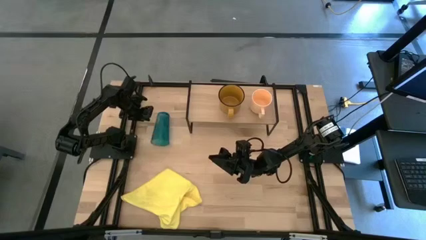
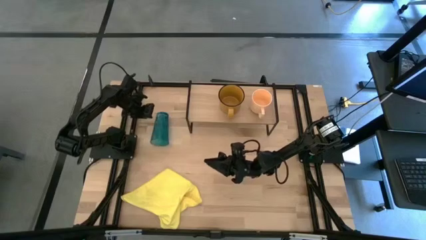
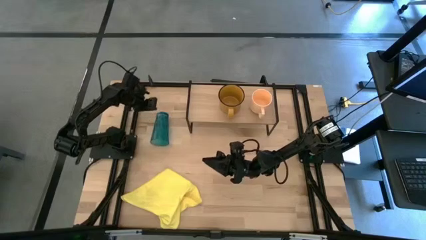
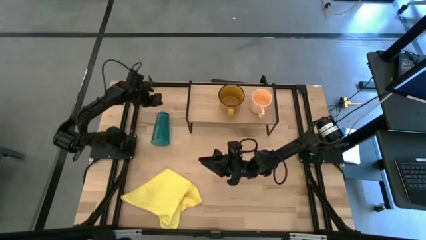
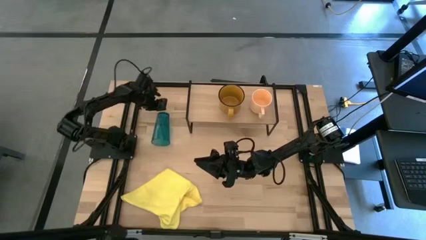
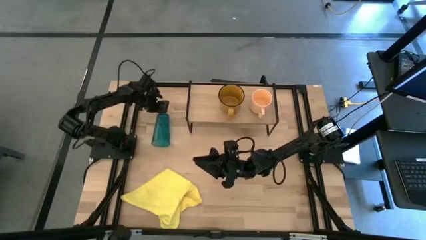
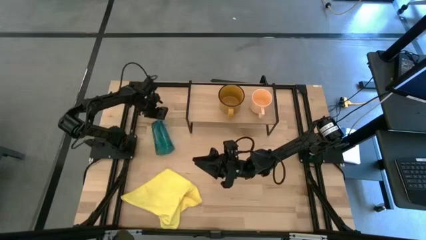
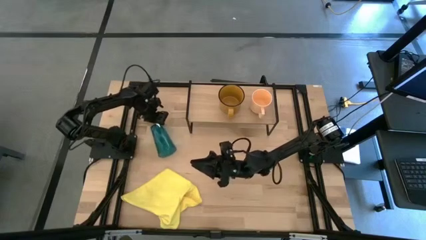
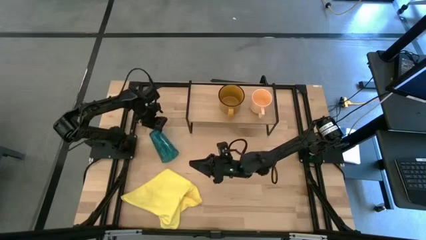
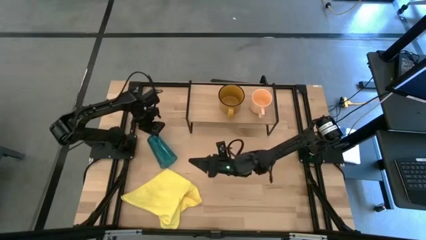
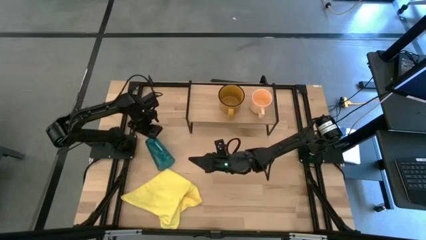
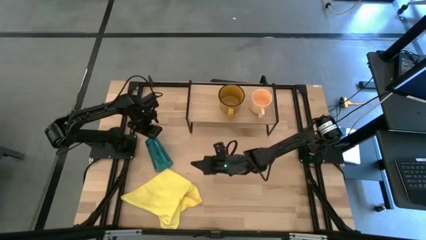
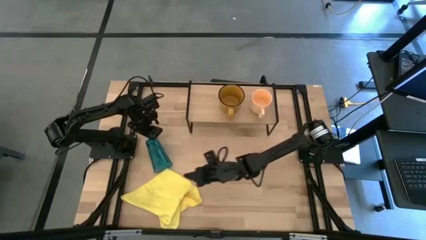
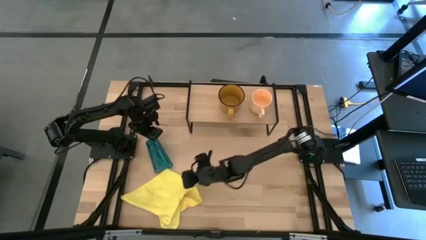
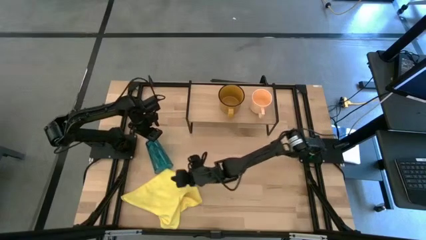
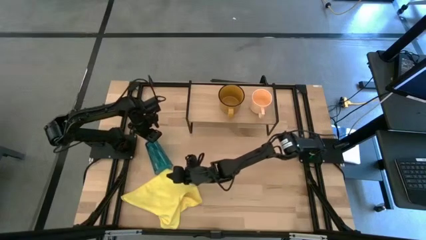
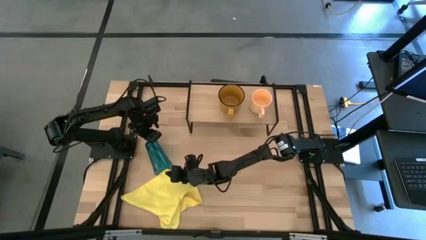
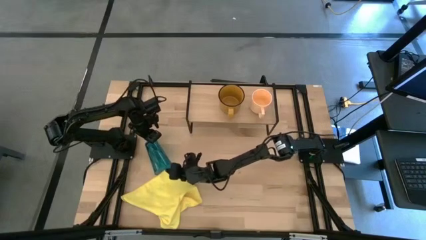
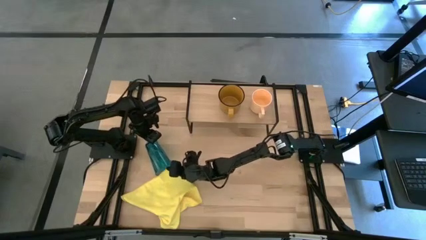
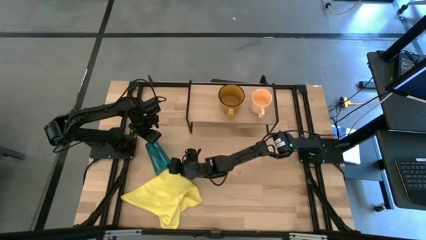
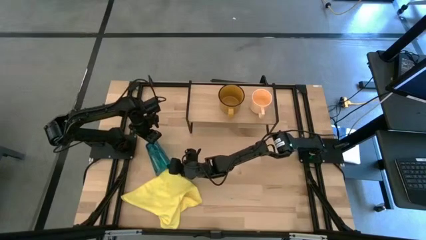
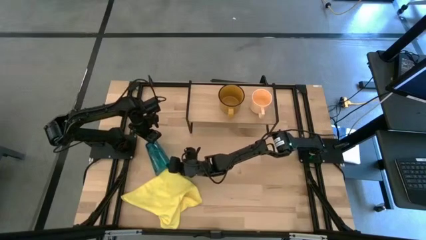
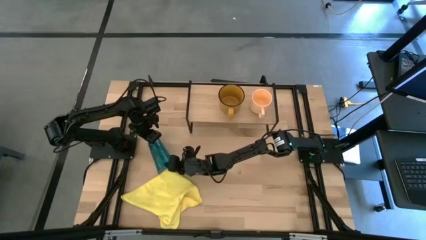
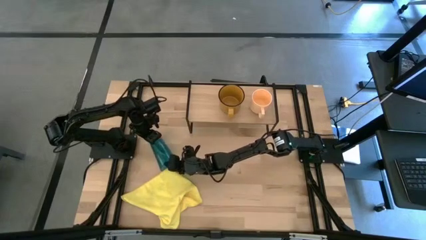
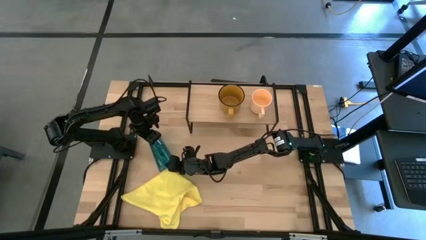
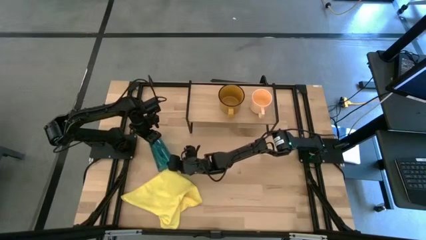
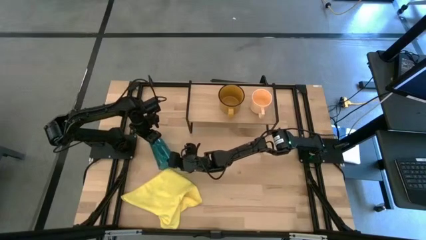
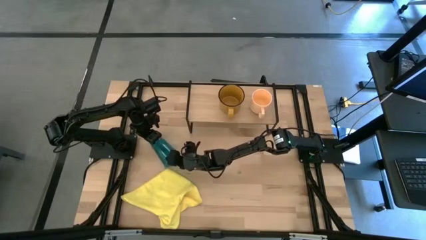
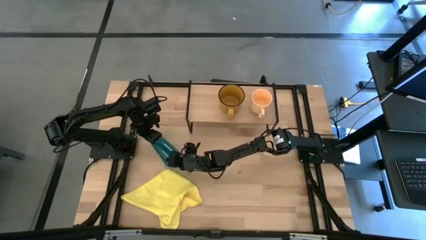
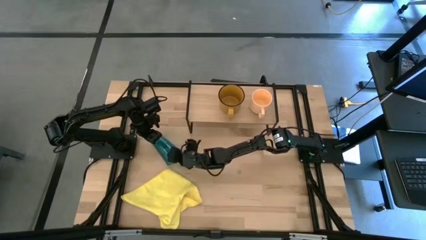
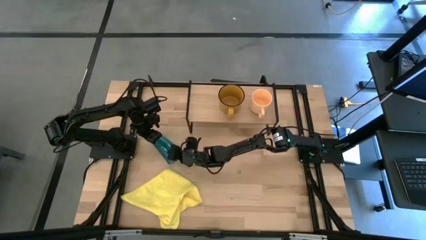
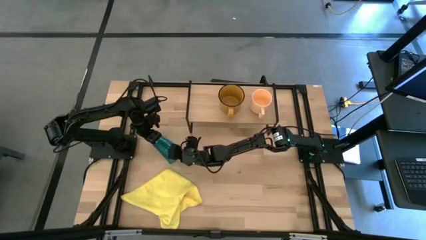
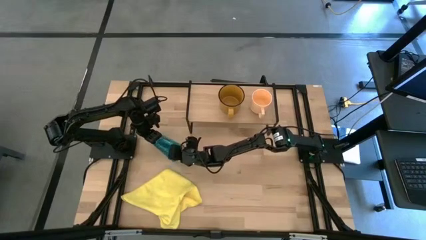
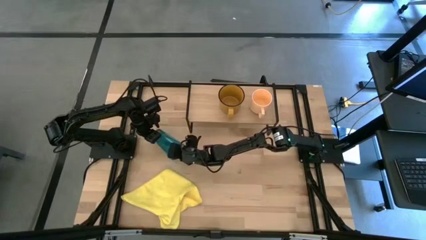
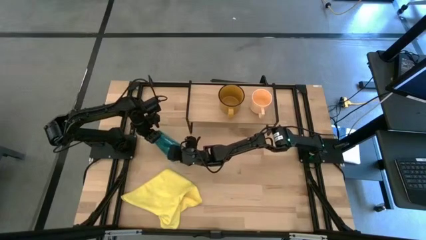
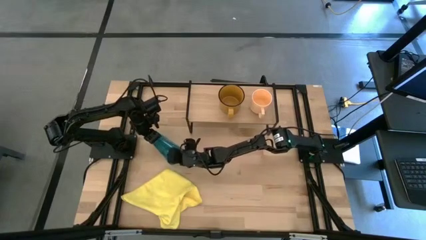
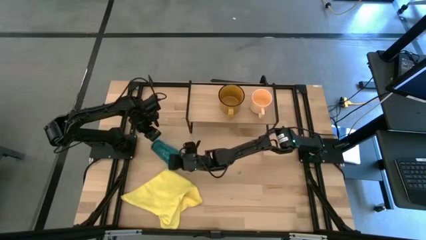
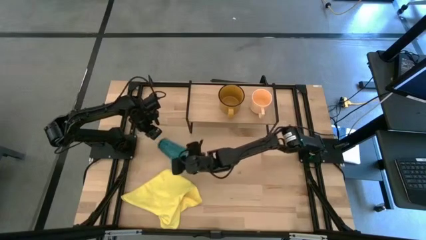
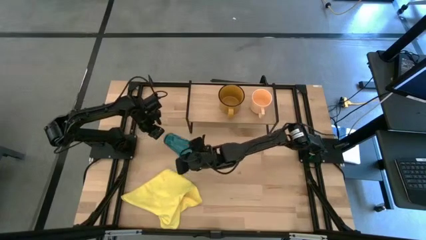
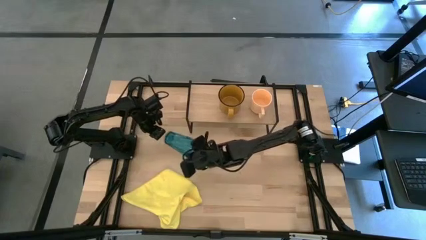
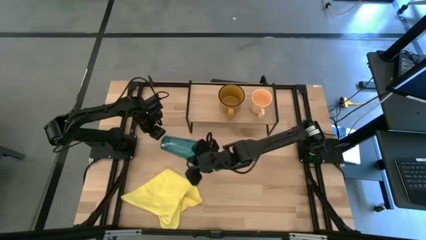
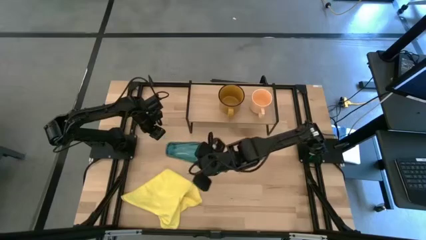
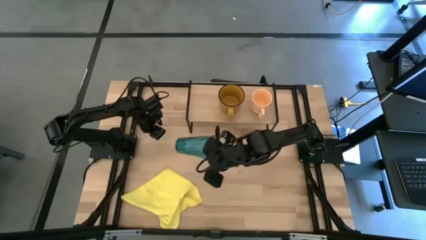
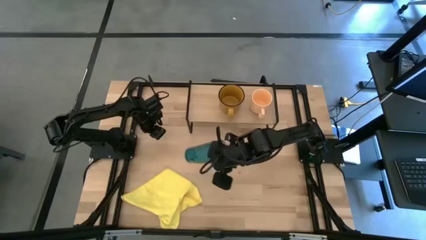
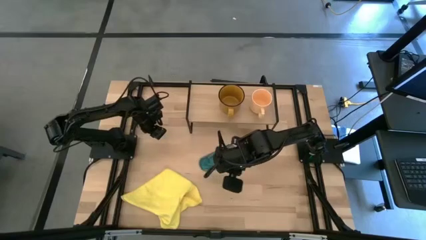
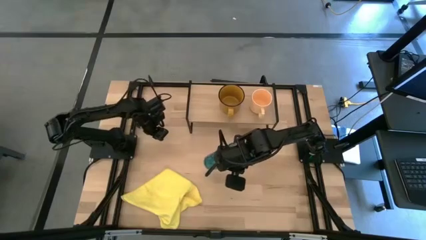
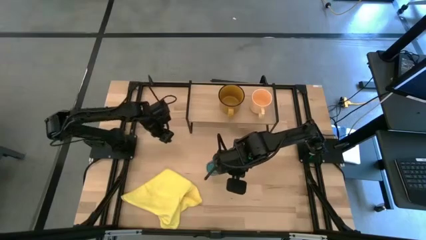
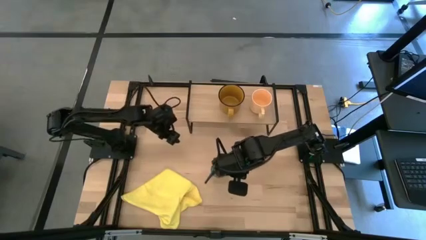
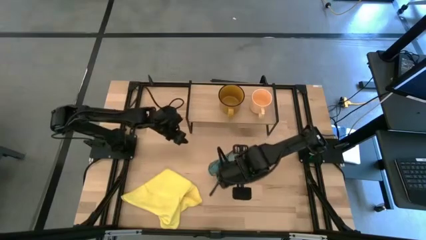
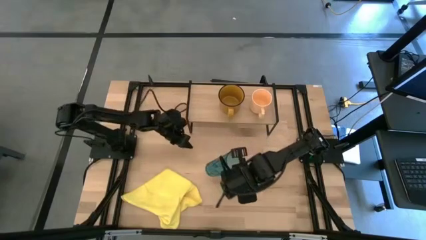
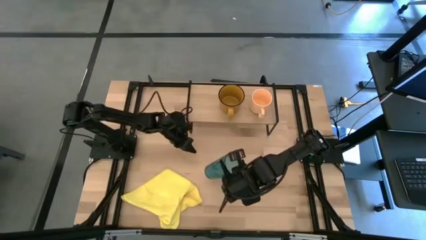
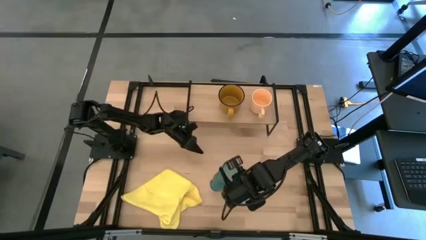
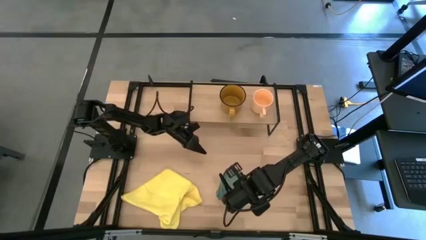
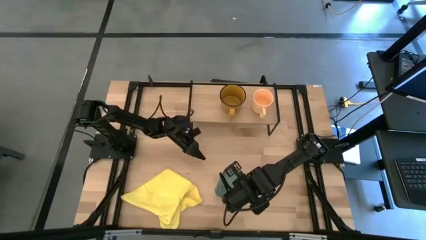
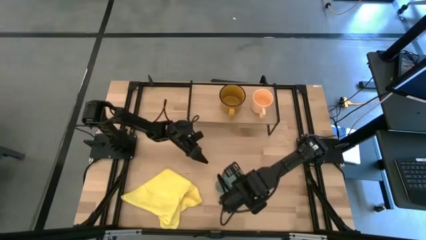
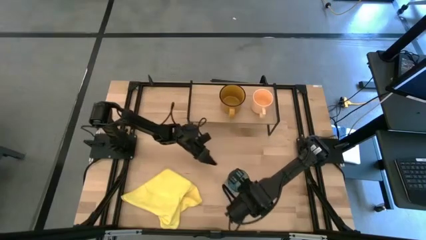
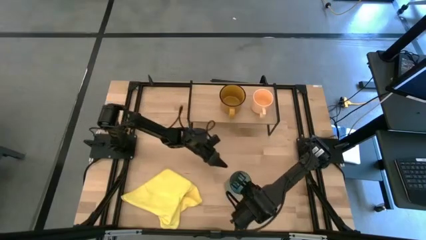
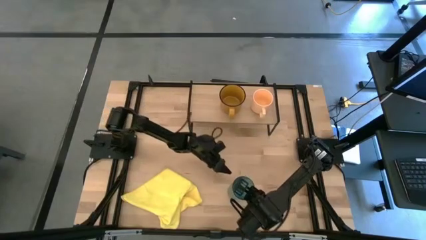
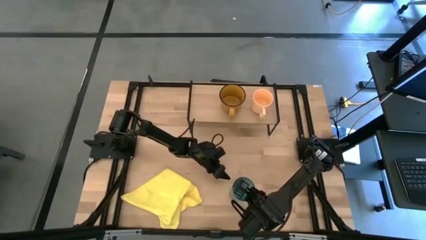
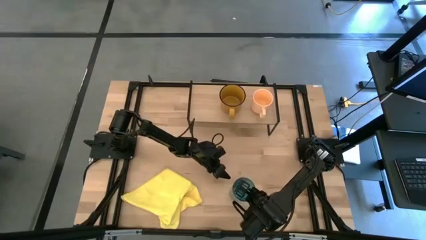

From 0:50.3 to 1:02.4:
Task: Stack small to large cups/mugs on shelf
Put the blue glass on the shelf

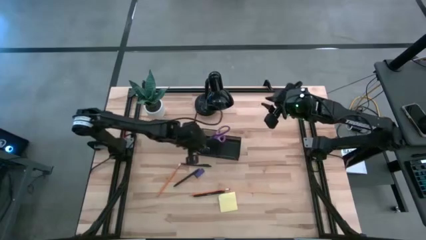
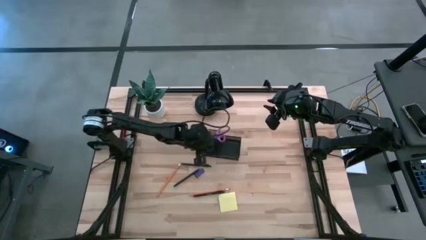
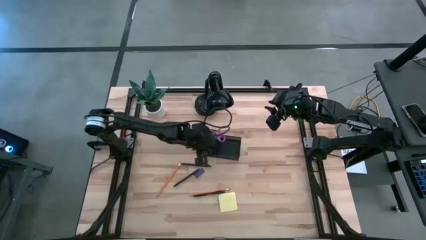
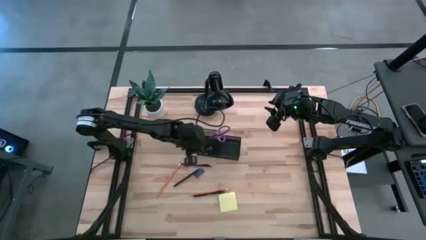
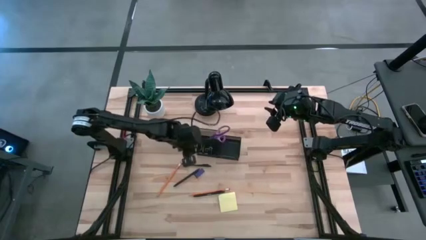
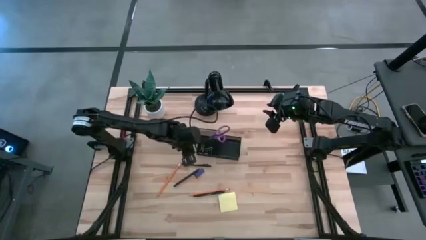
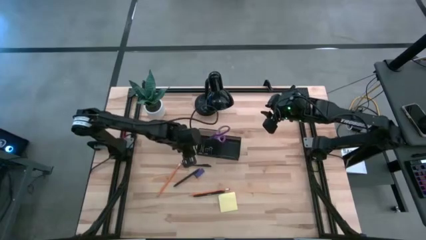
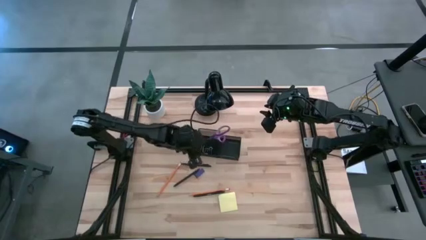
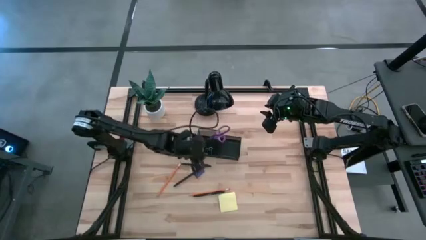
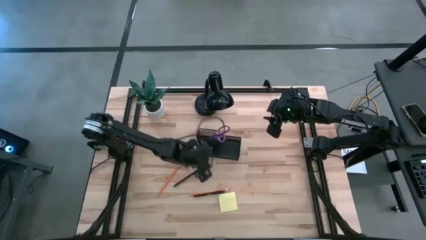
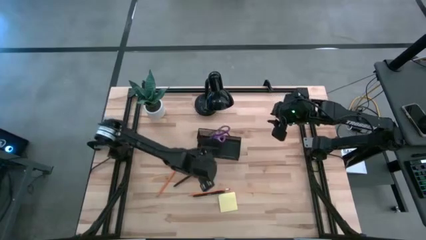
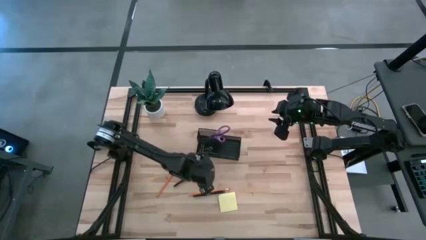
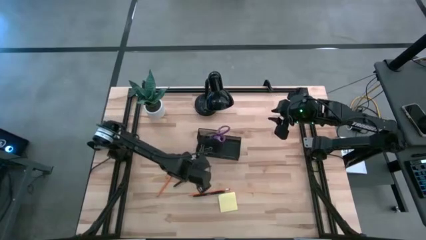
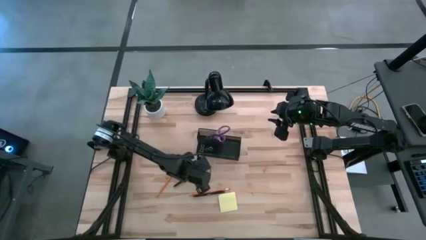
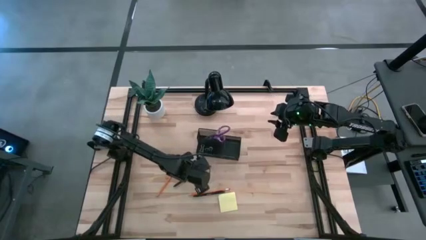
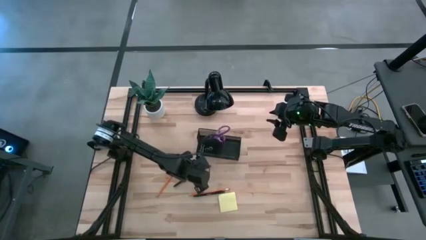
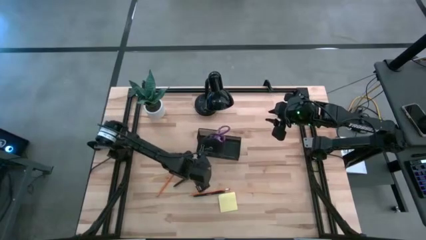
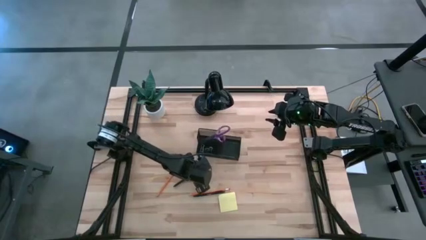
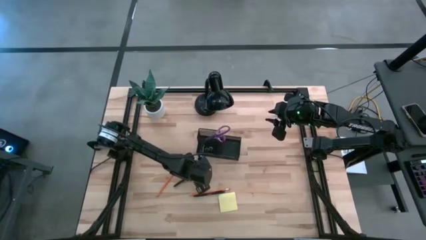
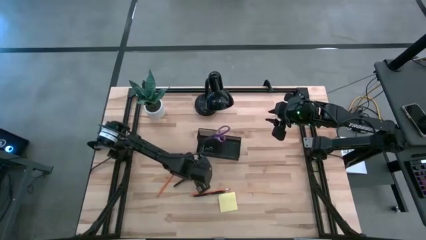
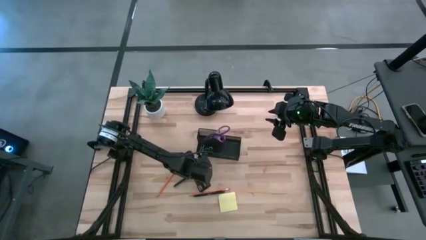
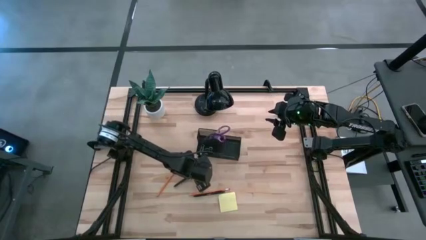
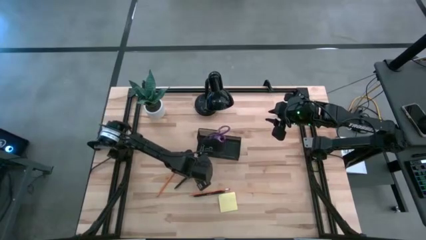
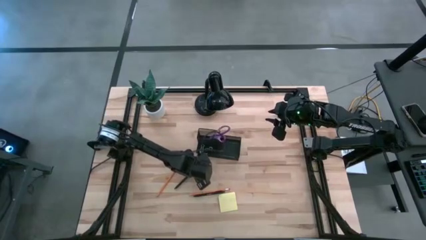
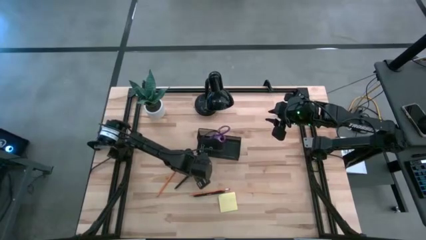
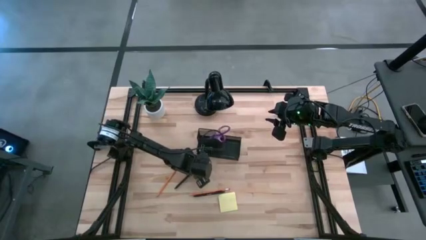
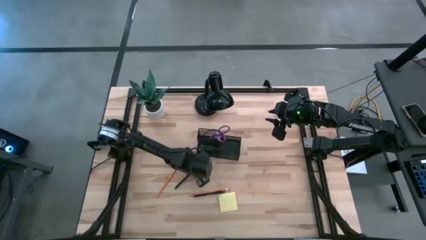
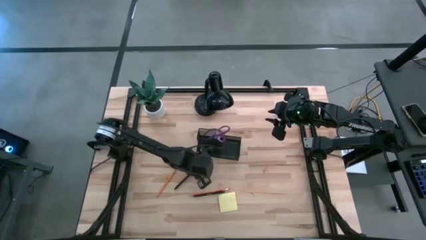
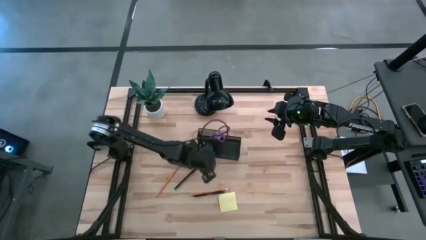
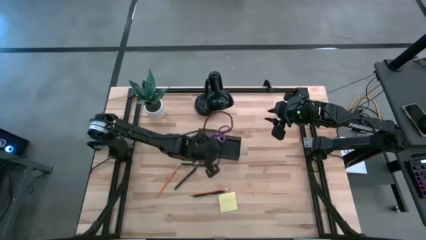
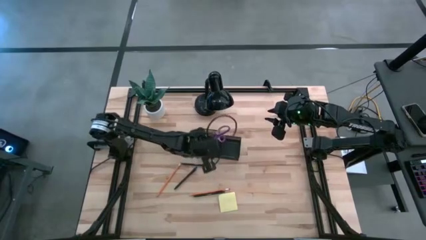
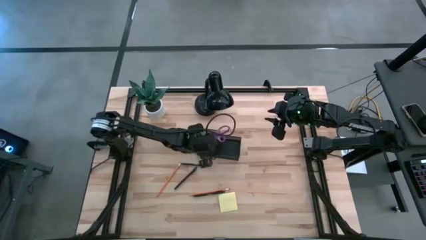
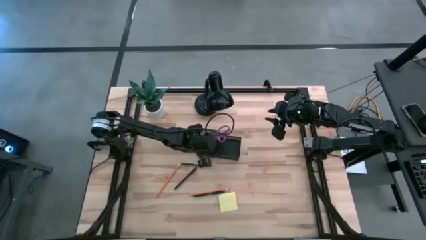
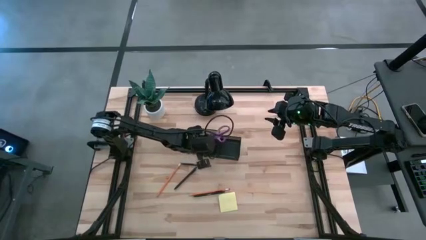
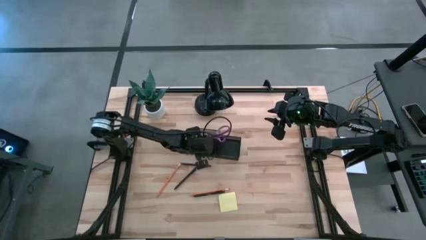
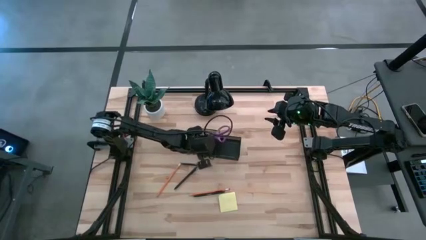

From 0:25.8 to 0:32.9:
Task: Pick and place office supplies into organizer
Put the blue eraser into the black desk organizer
